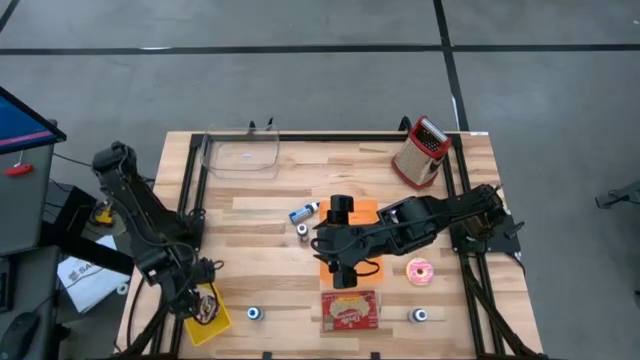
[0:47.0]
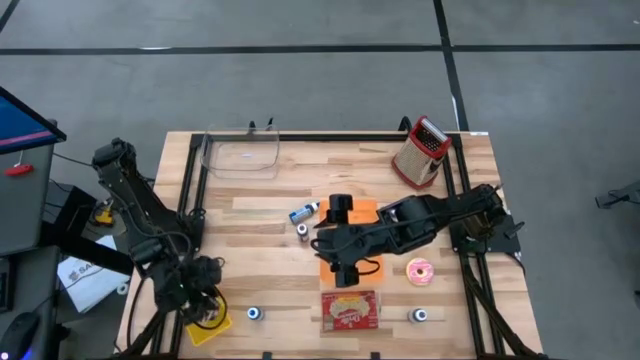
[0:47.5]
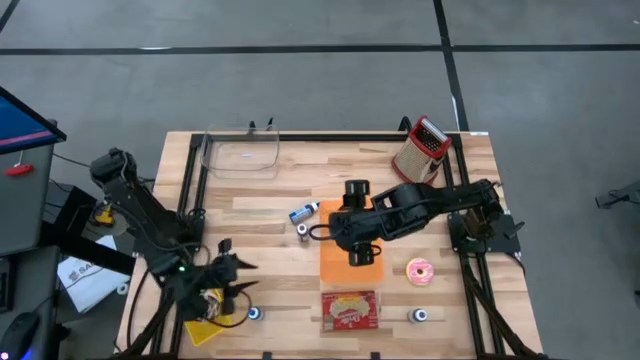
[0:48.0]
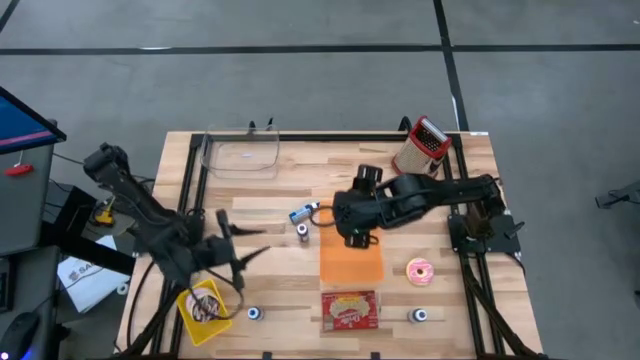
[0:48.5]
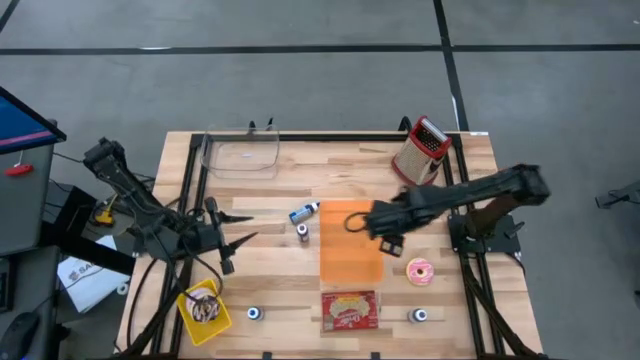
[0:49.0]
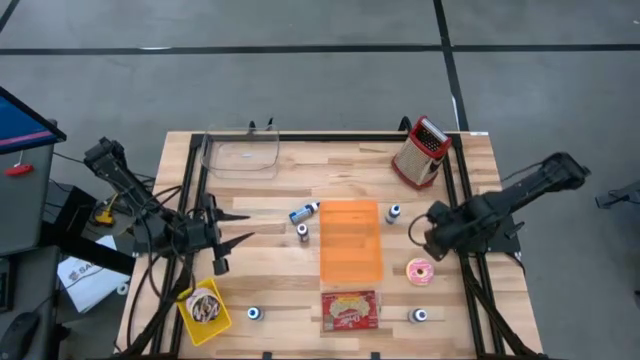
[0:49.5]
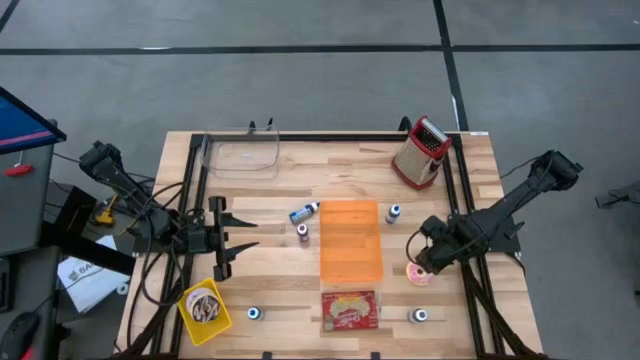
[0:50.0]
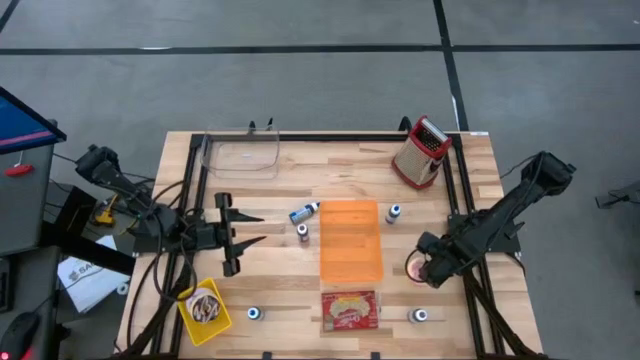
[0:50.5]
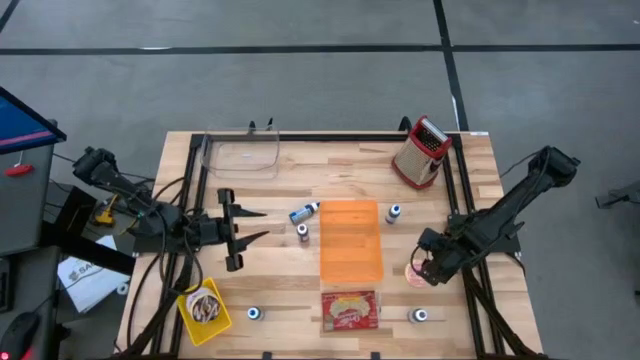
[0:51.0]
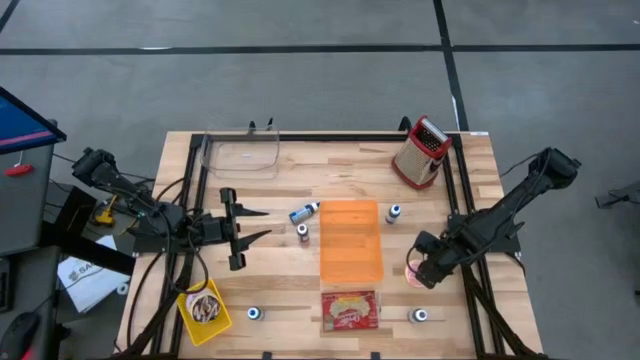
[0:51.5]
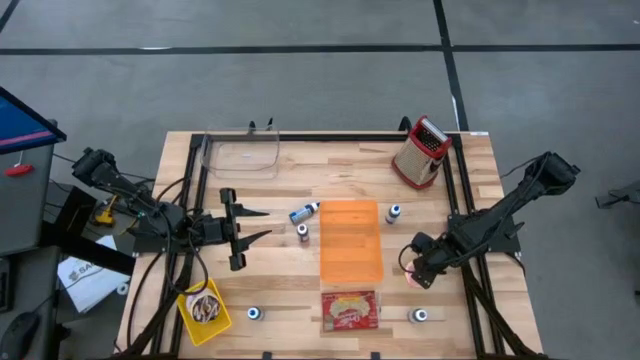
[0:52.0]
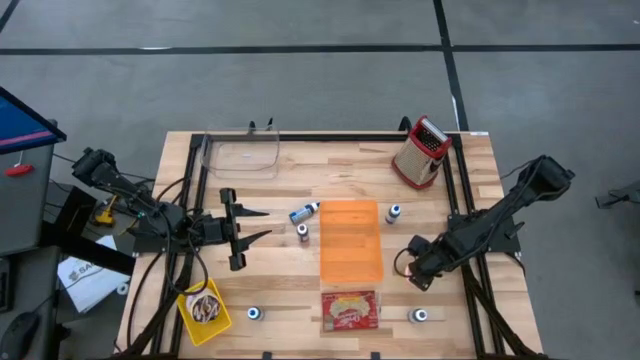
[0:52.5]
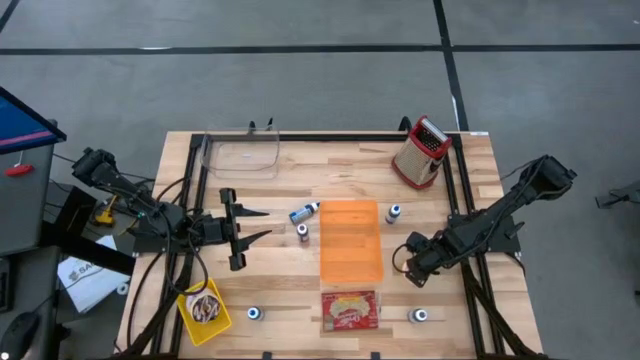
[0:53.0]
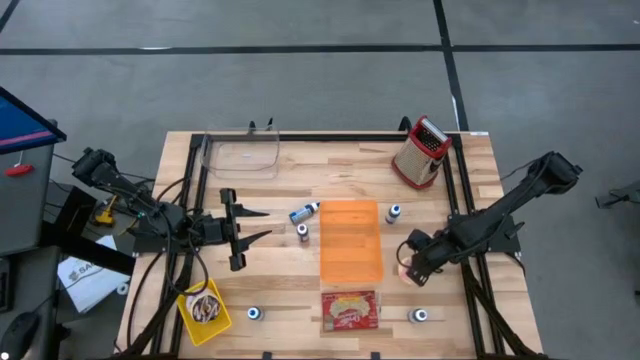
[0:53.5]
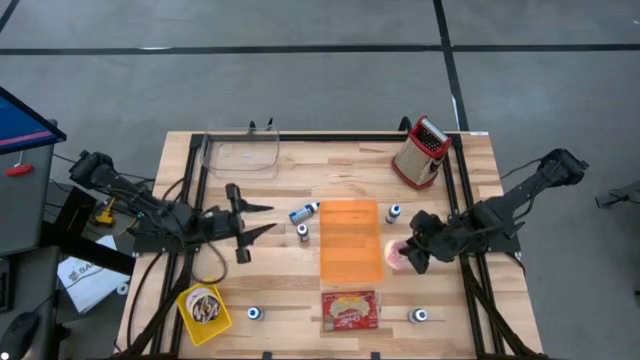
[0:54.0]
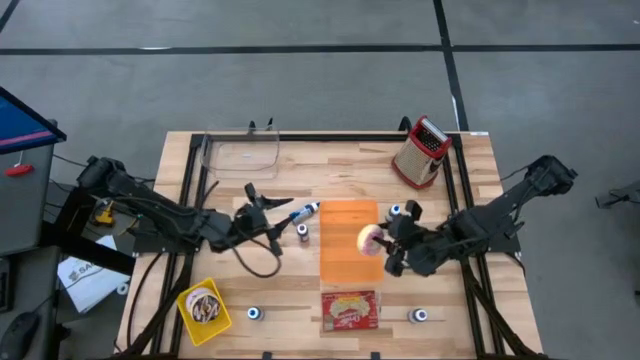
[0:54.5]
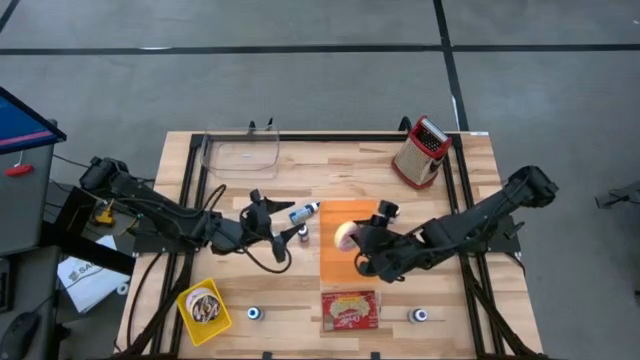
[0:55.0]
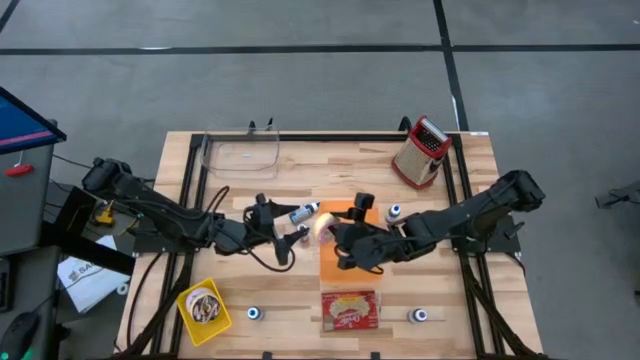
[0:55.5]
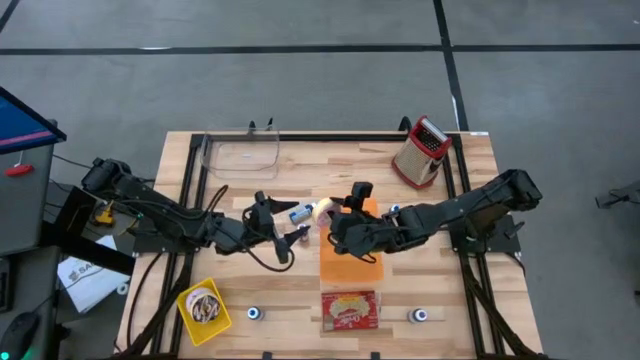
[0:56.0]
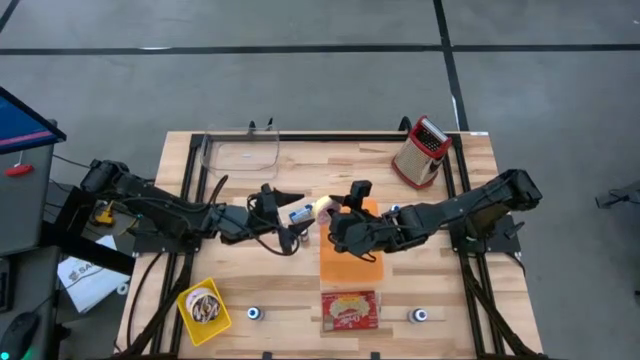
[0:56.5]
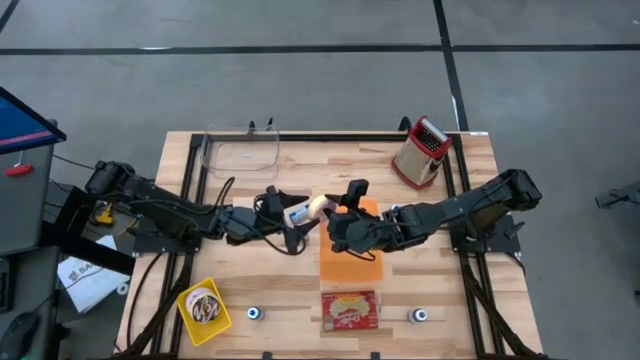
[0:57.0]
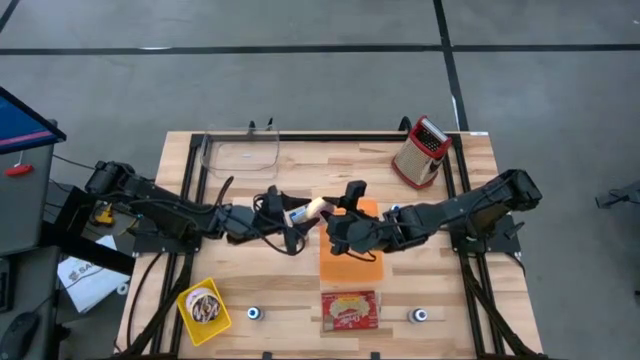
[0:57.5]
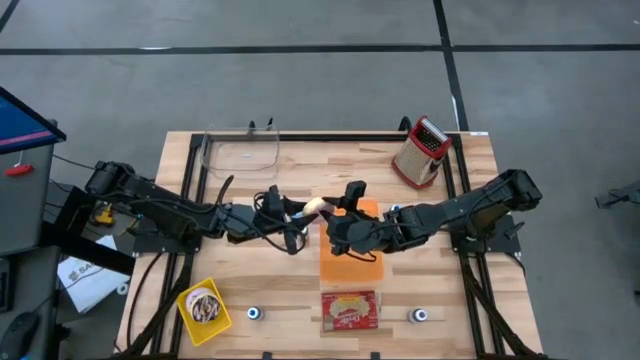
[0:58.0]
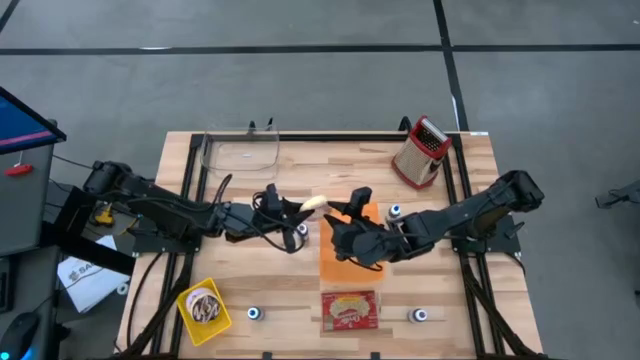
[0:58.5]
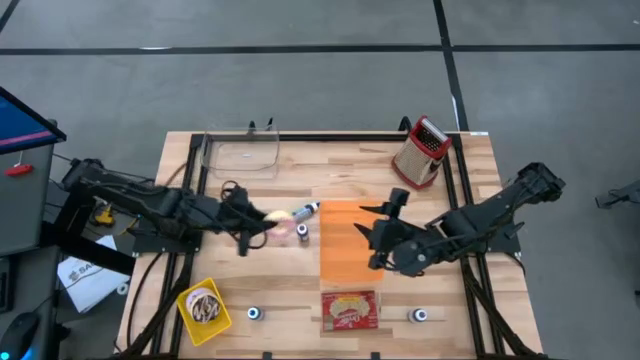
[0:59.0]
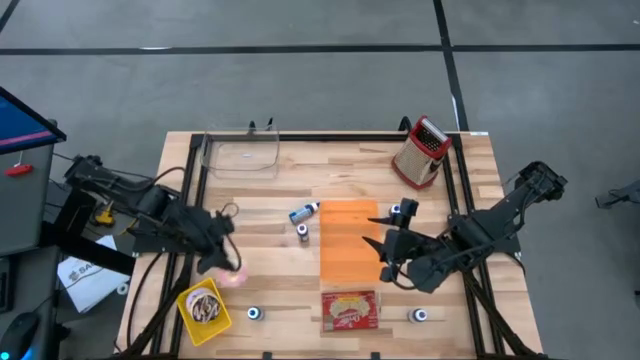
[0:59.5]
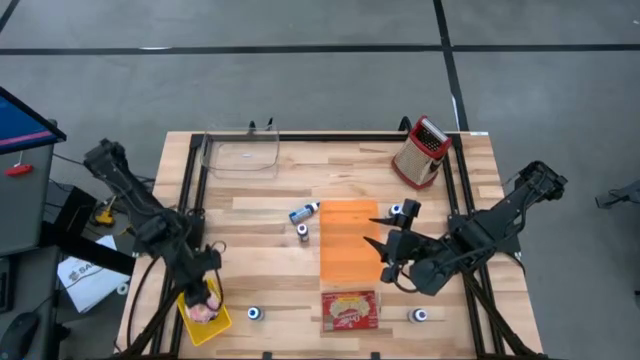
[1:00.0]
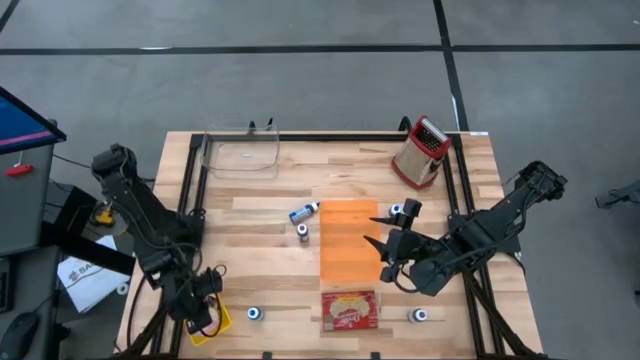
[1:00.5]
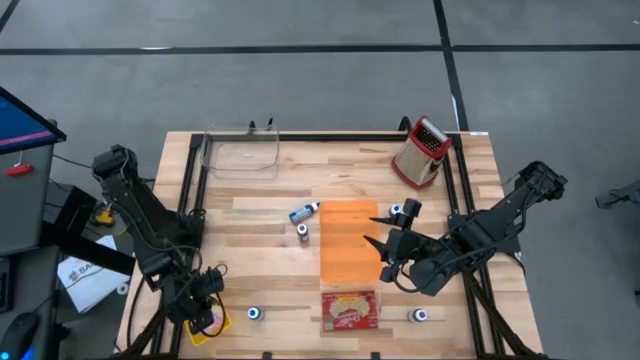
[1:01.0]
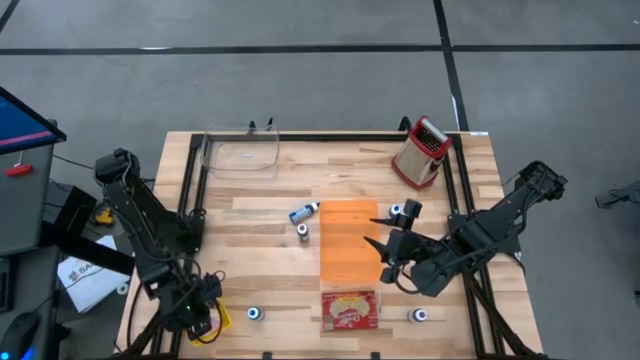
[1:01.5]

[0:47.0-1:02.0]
Task: Pick & Place Food Item
Put the pink donut into the yellow basket

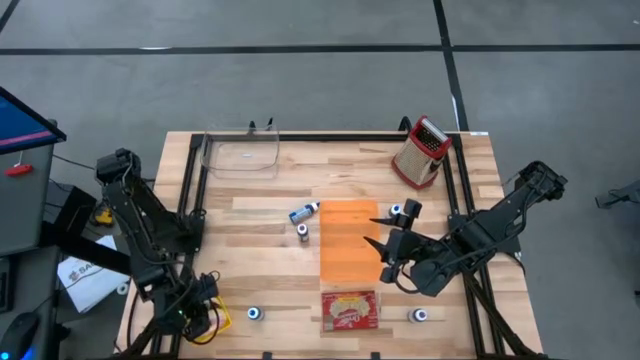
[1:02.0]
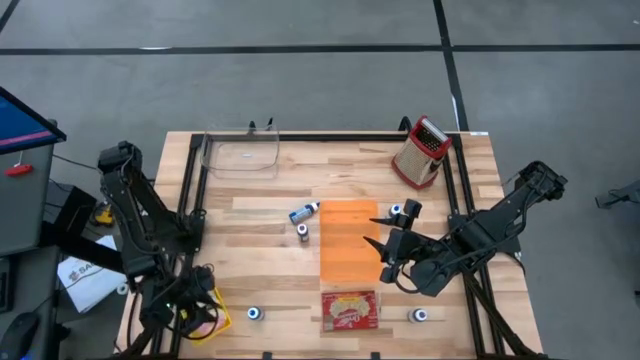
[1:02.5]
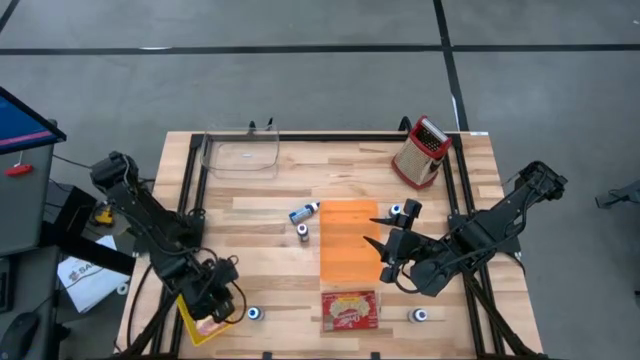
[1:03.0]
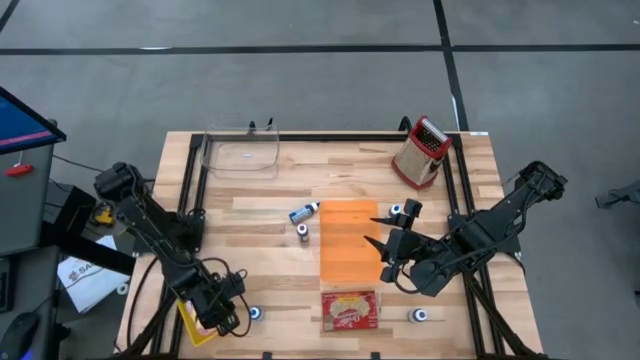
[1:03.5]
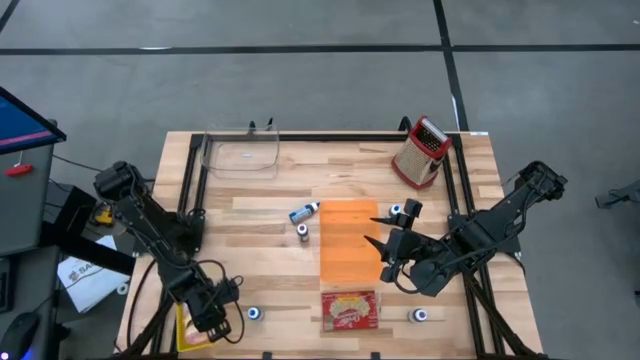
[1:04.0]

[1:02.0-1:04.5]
Adjust the yellow basket

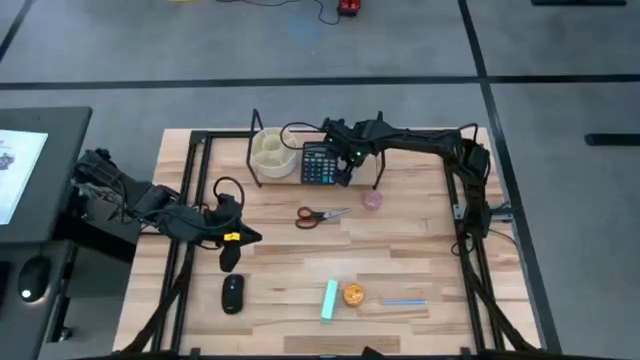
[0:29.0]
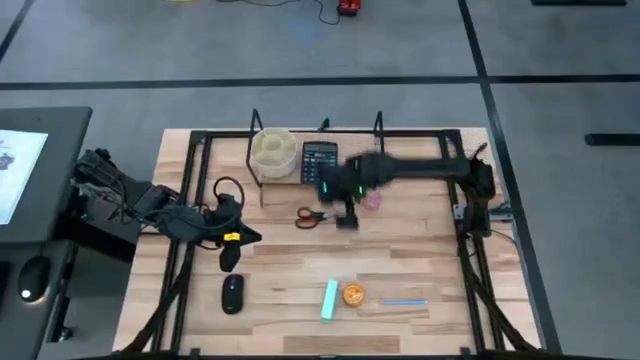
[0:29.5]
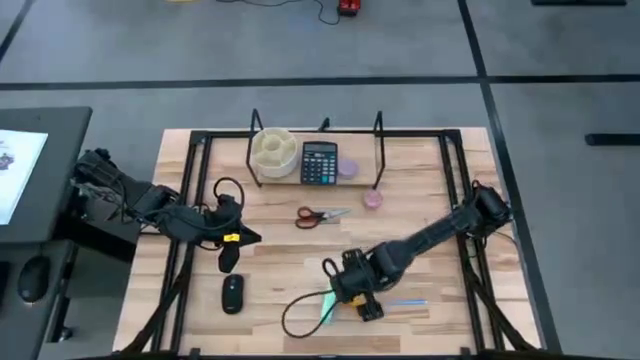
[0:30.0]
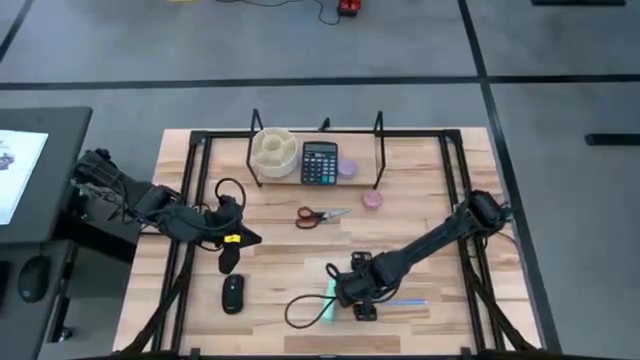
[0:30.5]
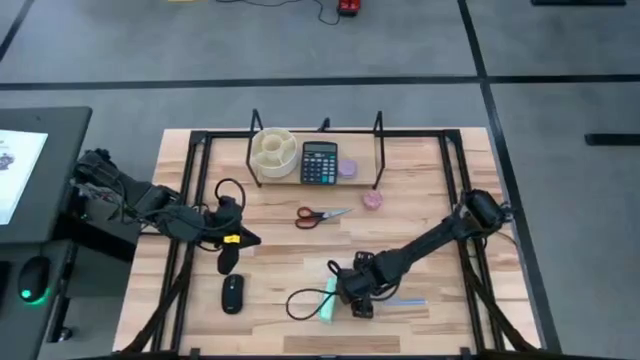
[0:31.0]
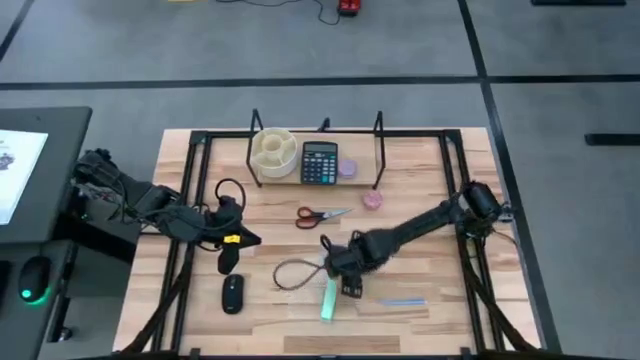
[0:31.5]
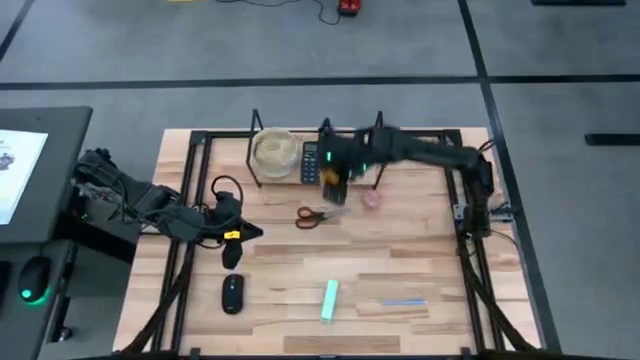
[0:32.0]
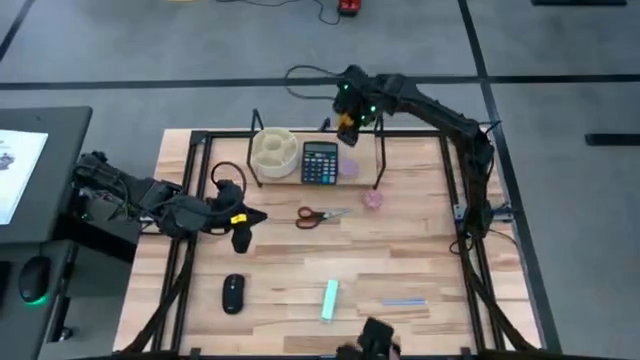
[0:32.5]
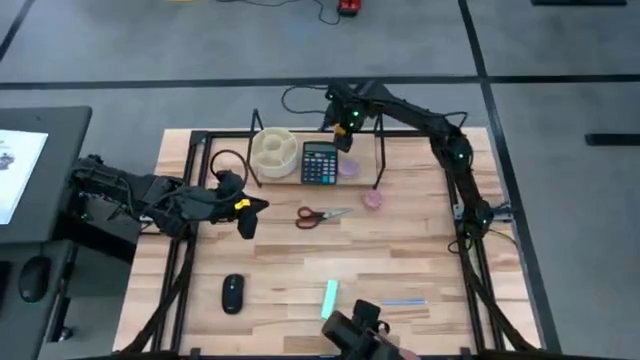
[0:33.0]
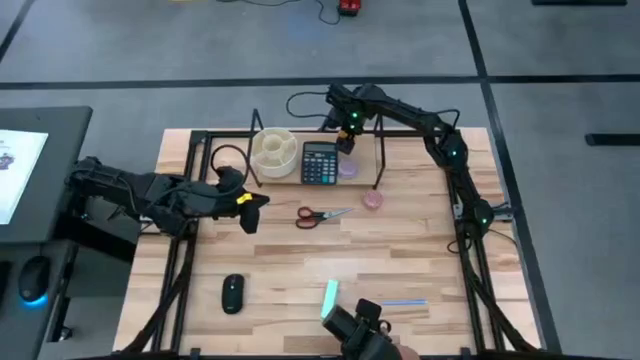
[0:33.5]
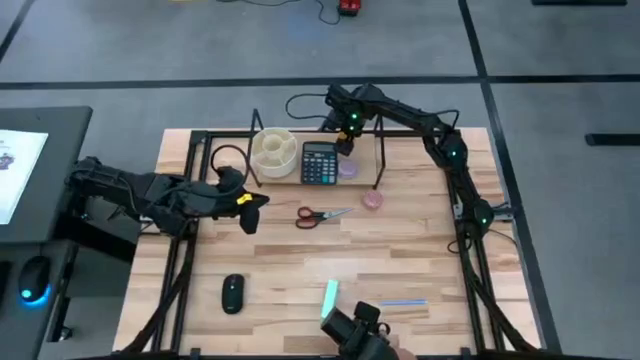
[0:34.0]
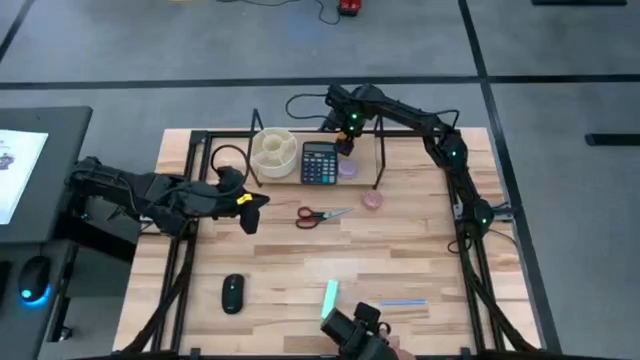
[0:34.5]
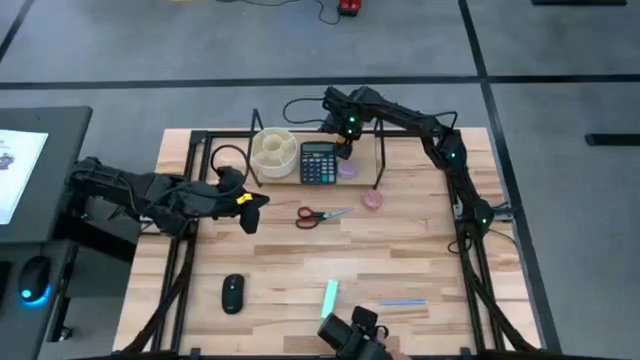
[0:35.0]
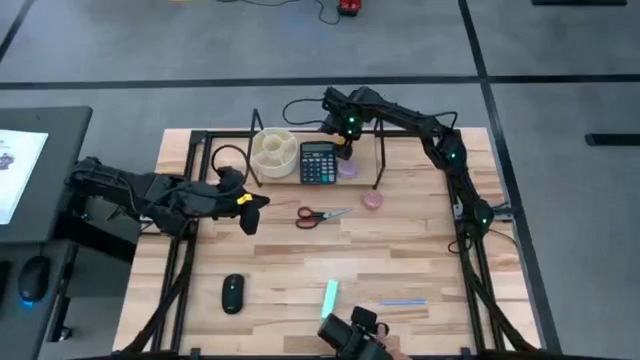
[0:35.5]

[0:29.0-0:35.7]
Task: Stock shelves
Put the yellow scented candle on the shelf
